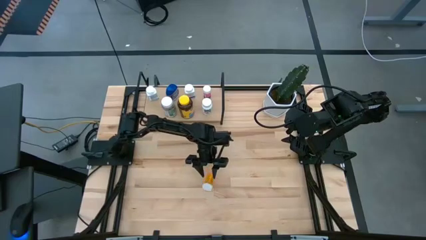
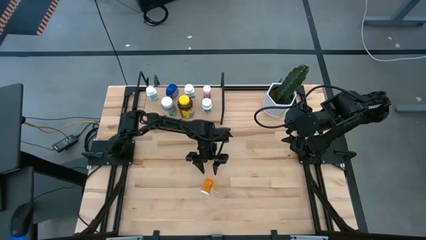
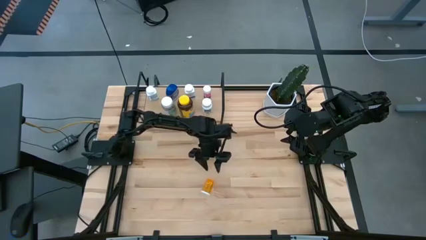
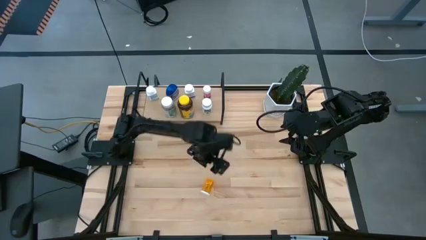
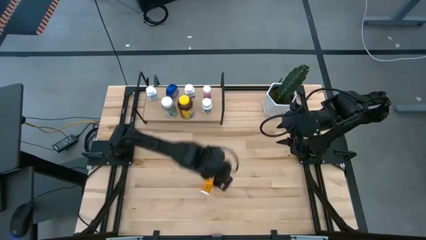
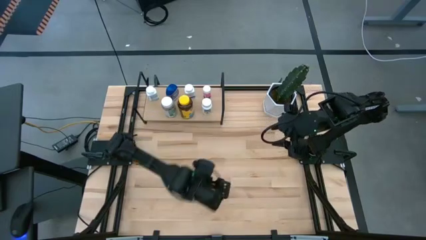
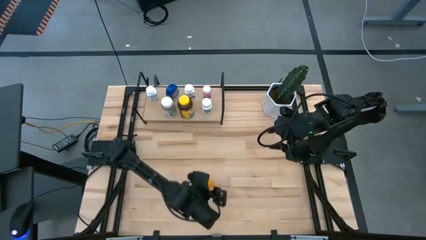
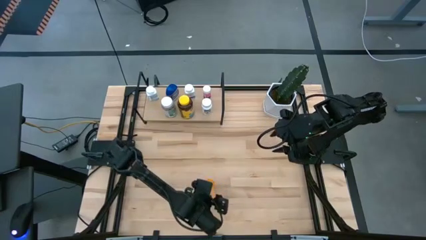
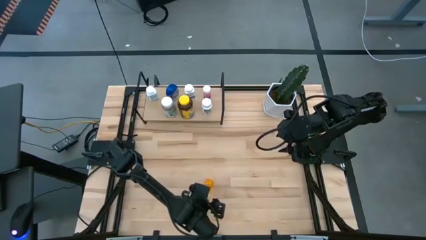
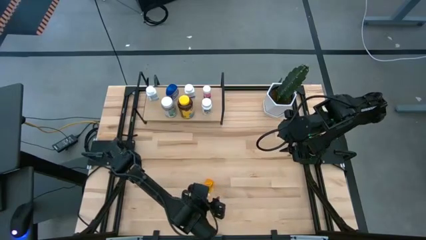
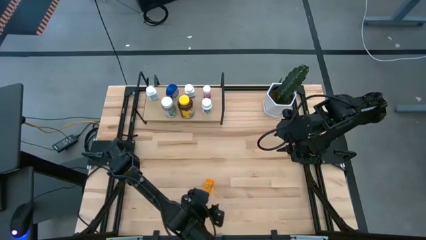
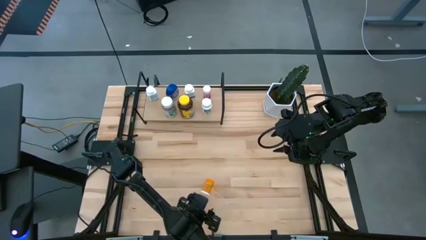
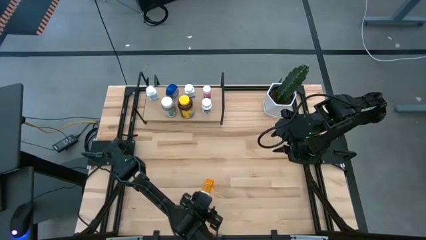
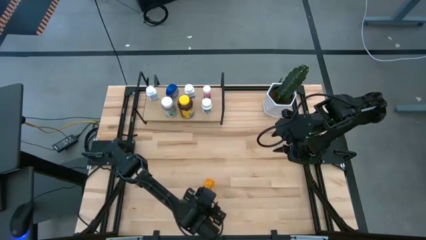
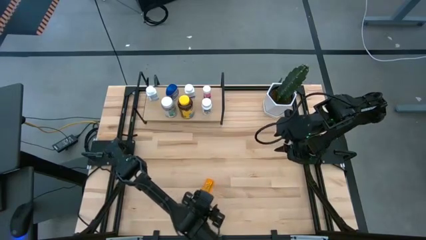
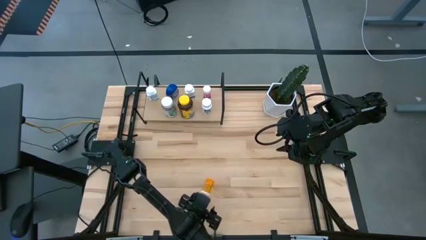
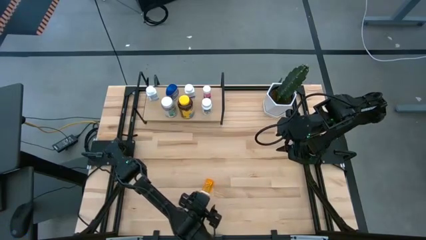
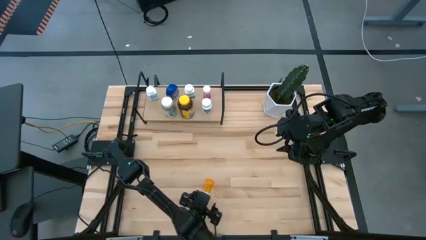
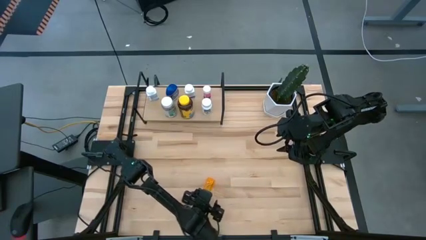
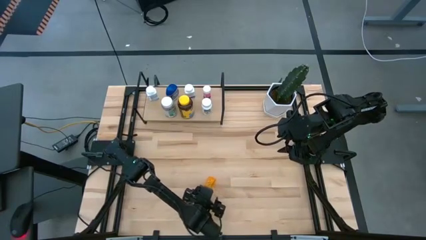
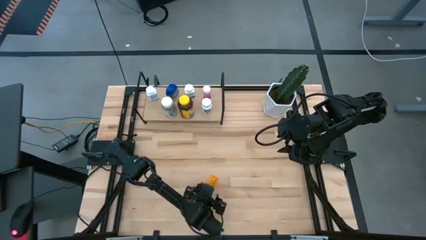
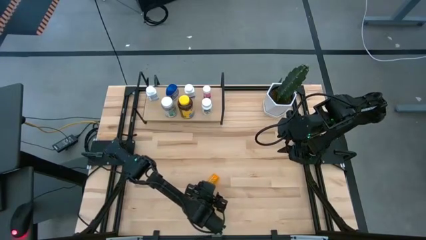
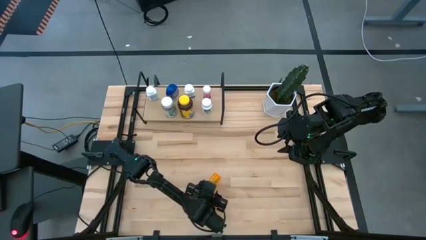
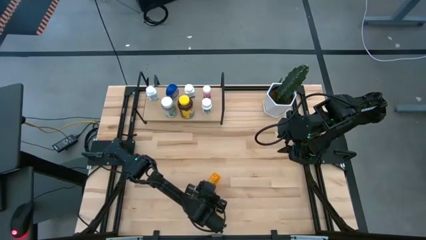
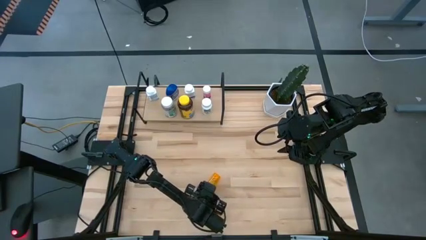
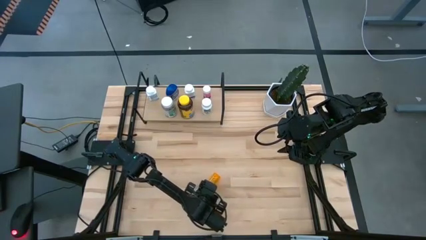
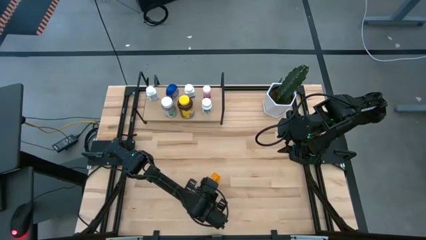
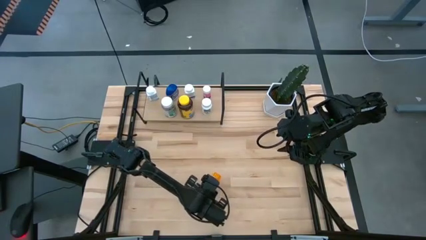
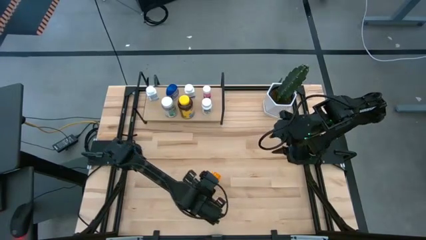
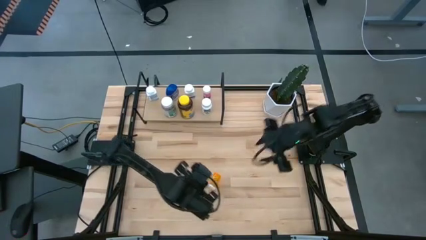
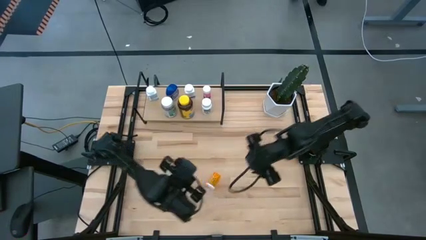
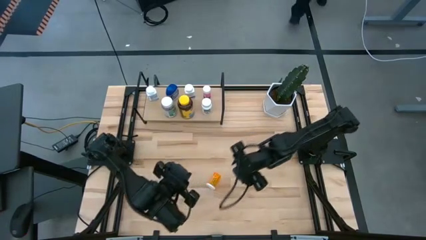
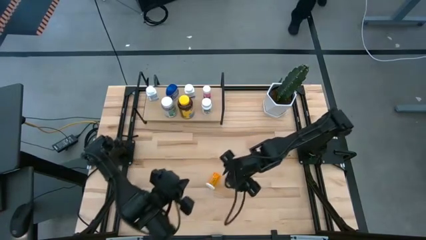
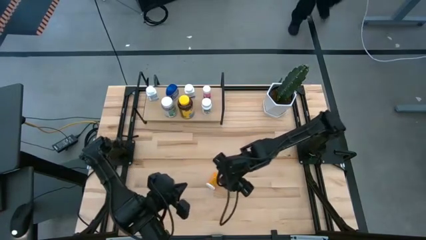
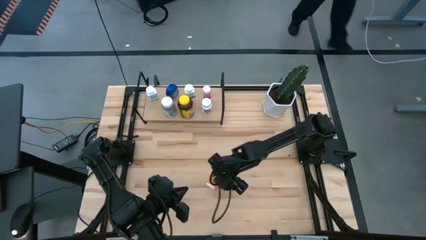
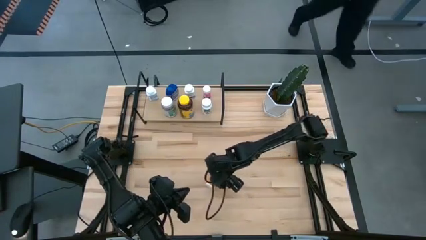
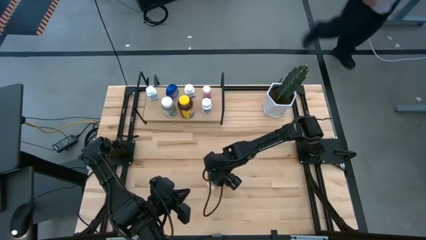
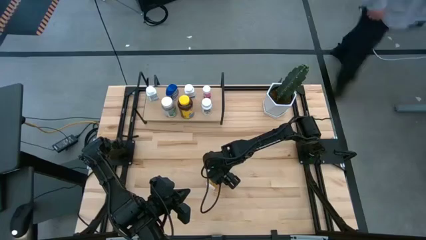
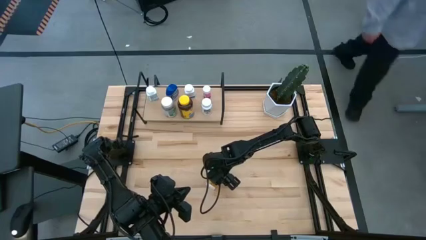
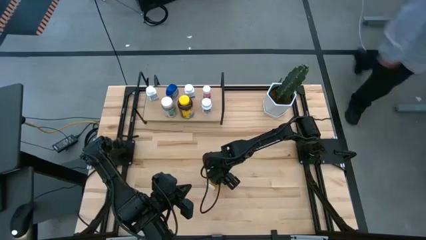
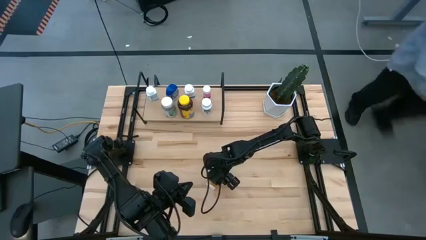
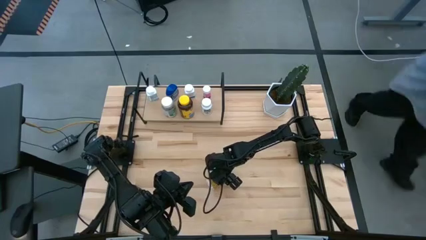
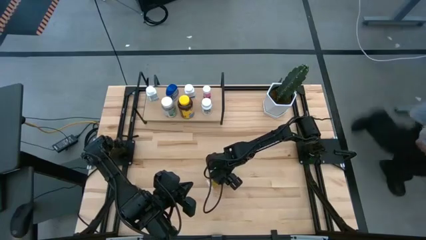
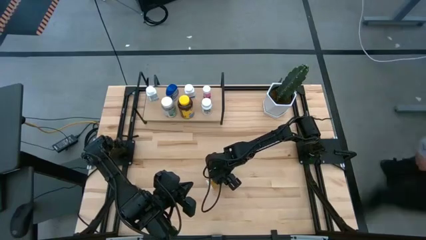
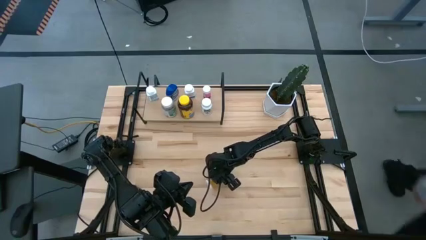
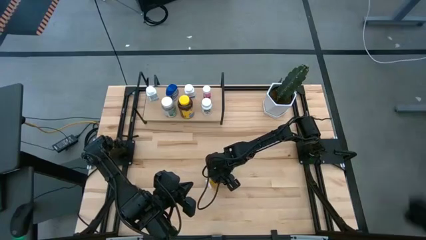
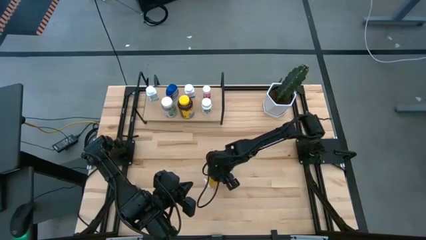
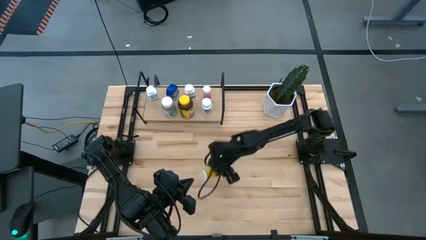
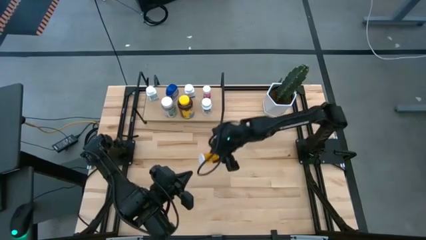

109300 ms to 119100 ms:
Task: Pick and place medicine bottles onto shelf by color
Put the orange pill bottle on the shelf

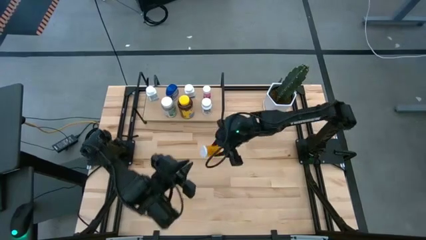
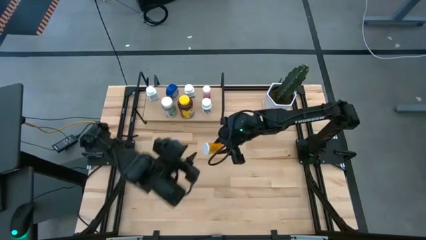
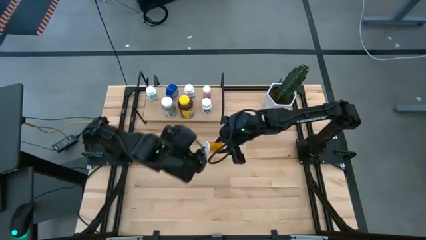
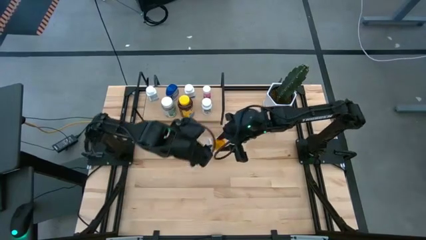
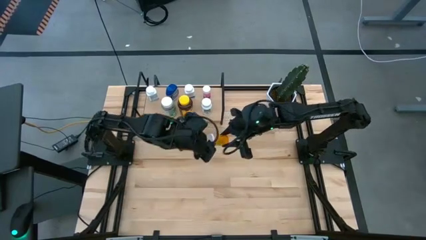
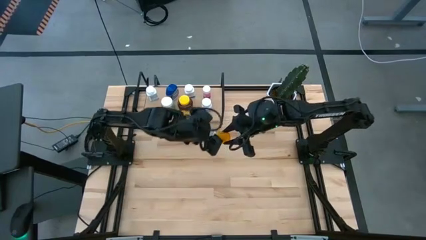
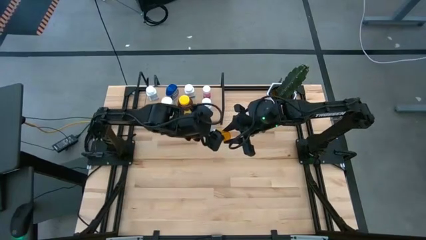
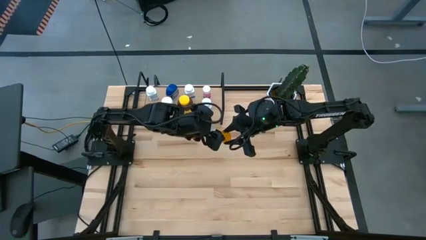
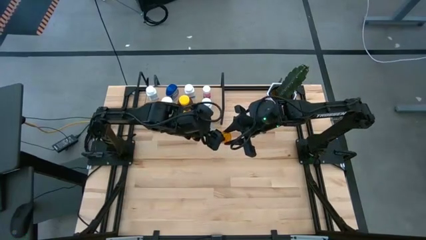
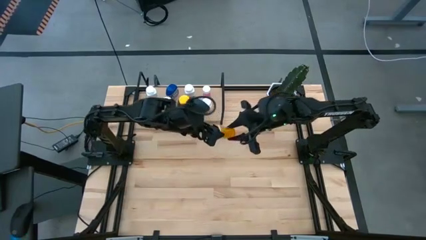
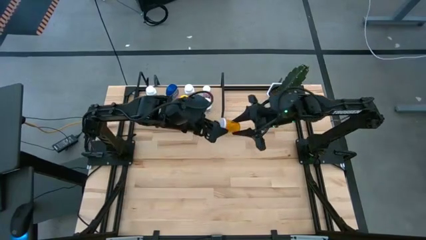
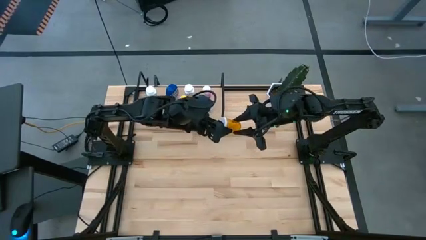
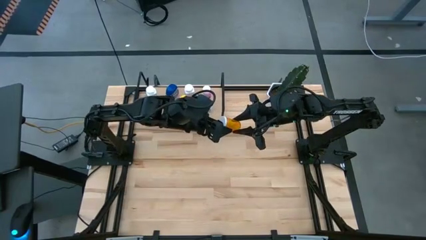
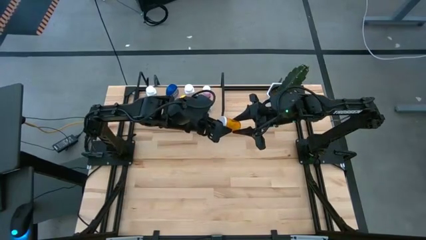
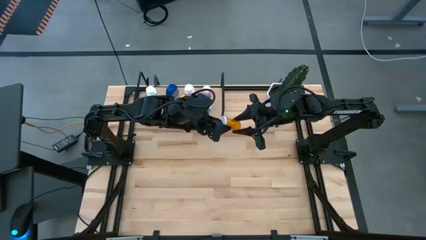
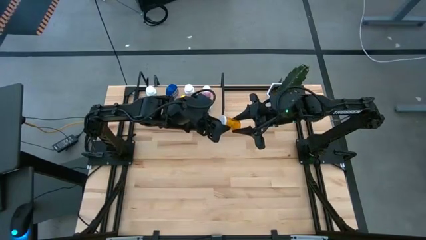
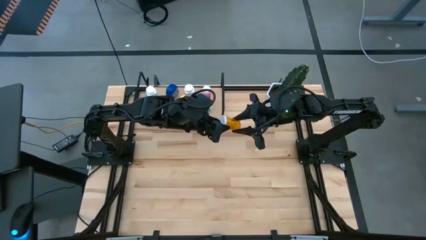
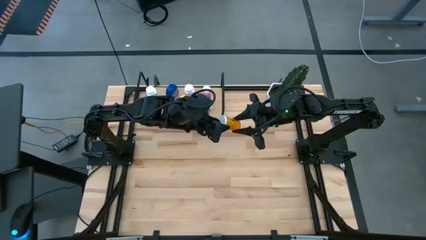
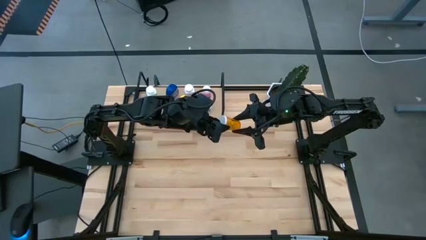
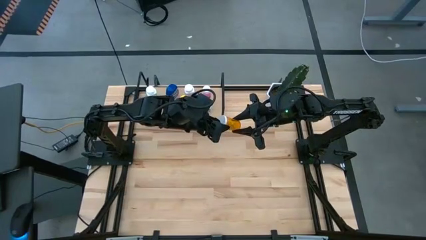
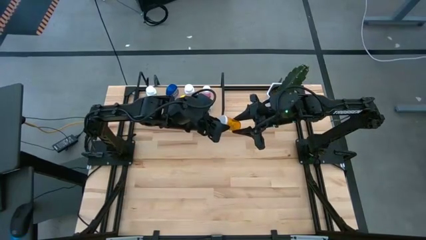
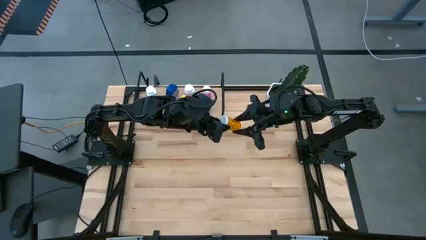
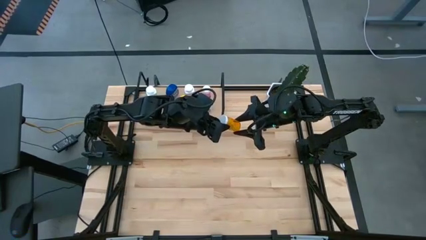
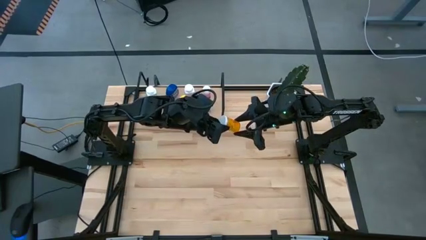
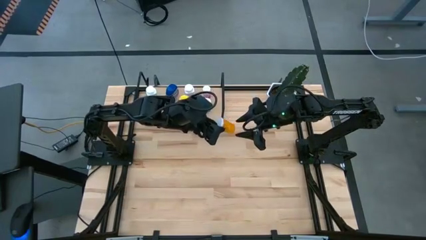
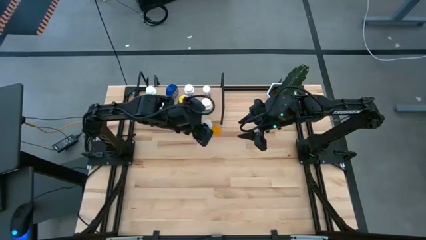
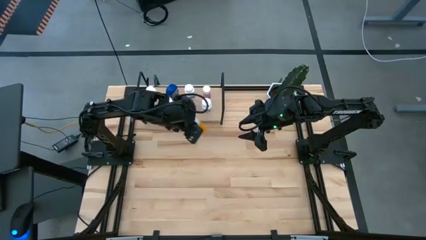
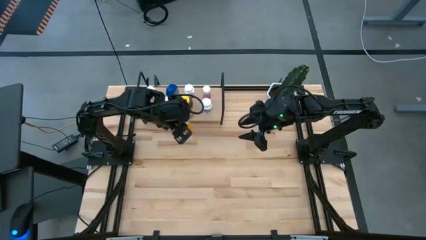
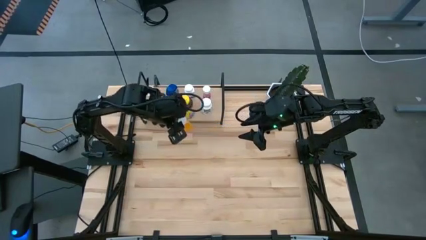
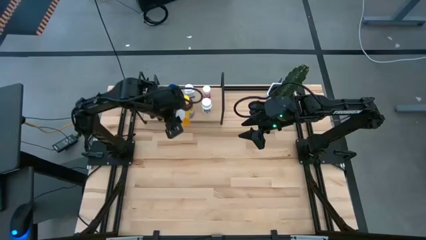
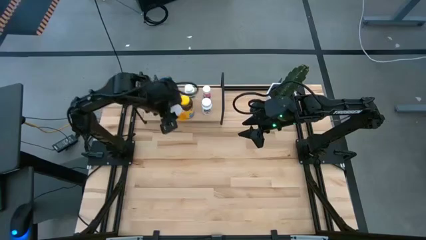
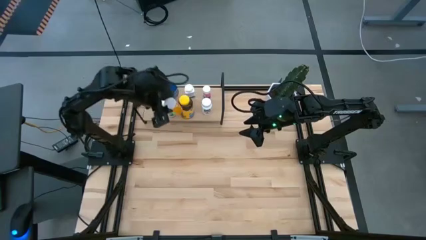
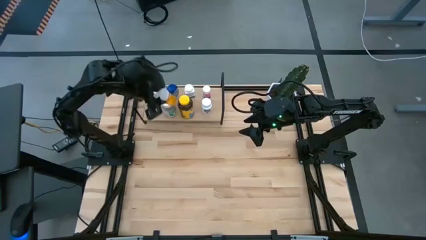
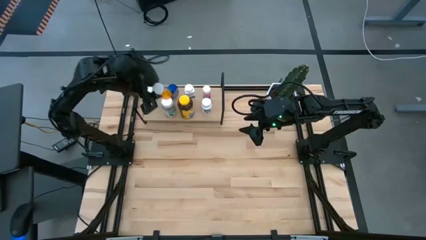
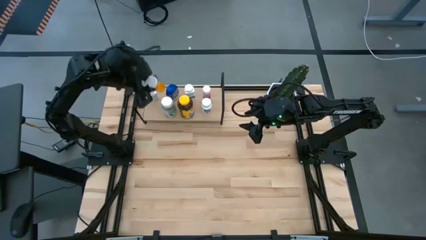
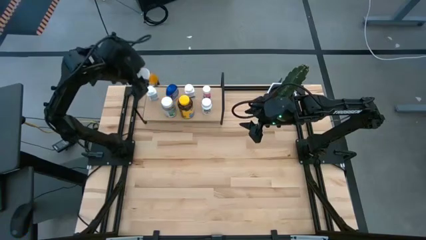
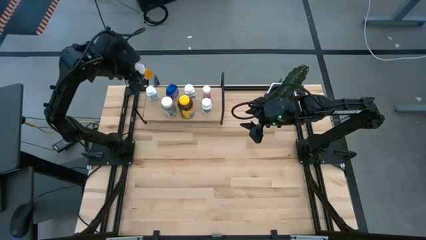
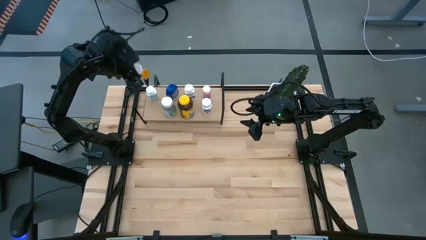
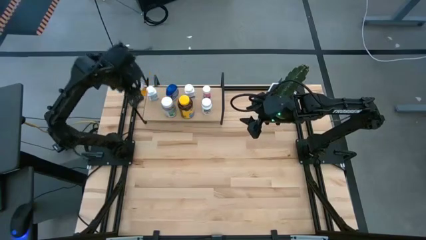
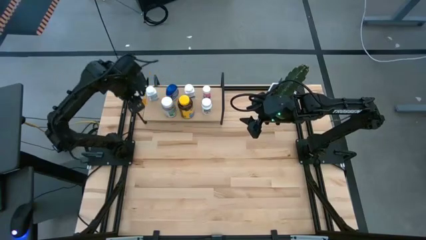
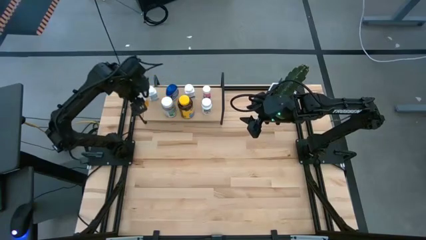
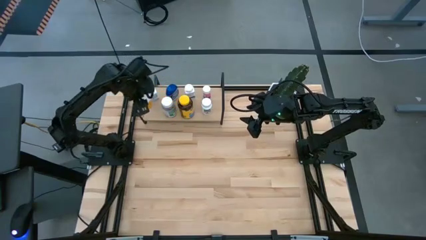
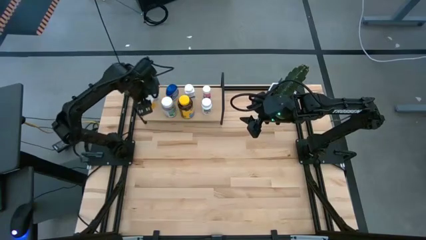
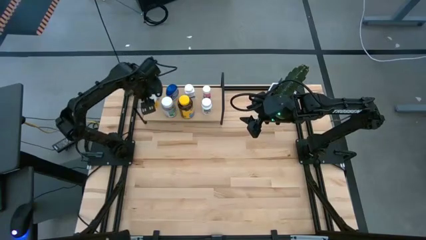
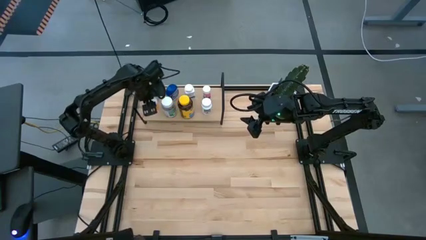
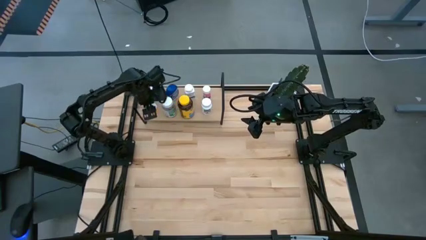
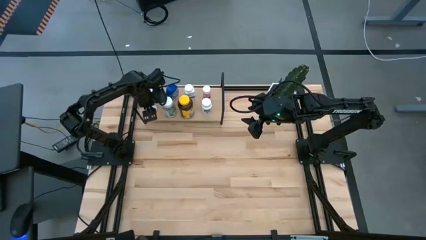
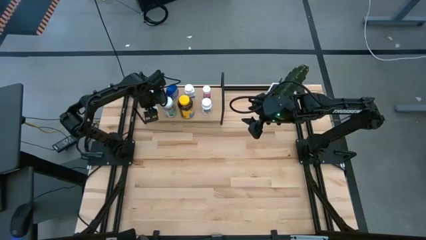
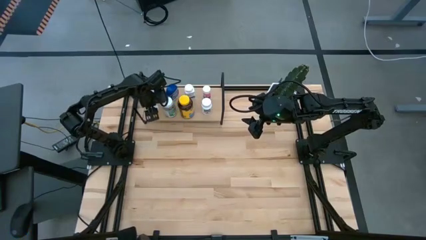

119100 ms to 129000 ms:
Put the orange pill bottle on the shelf
